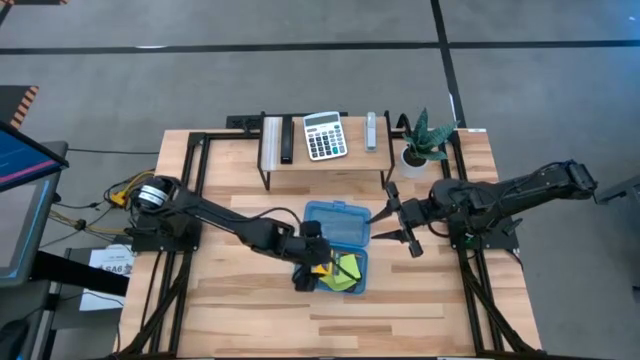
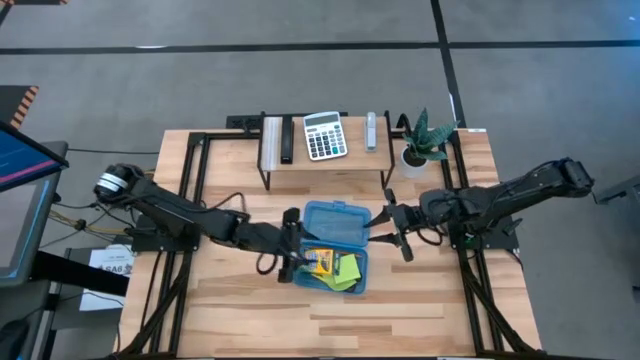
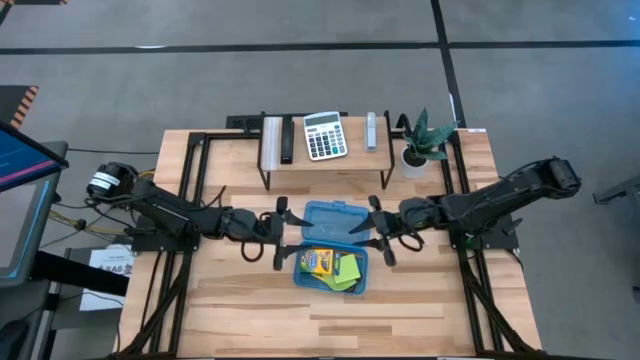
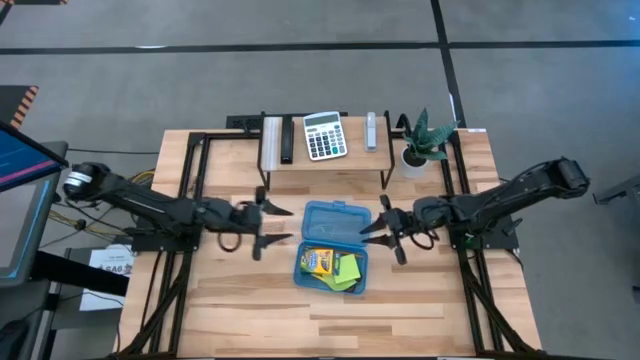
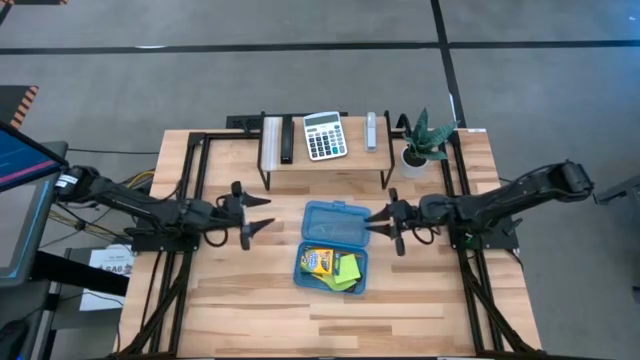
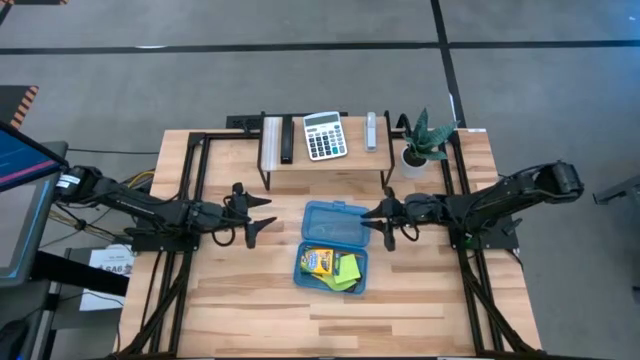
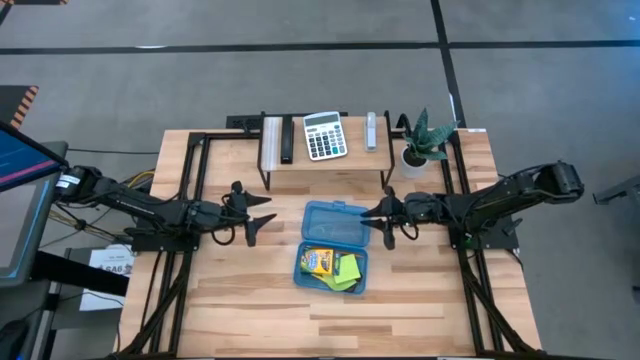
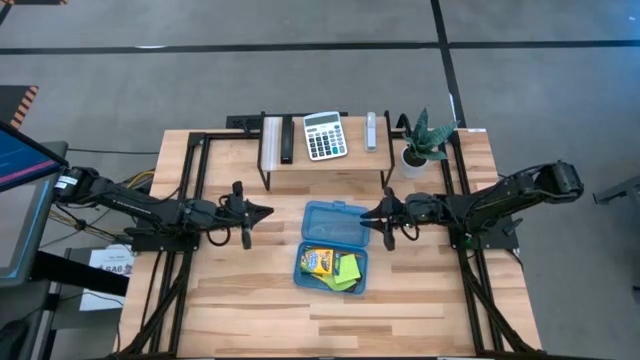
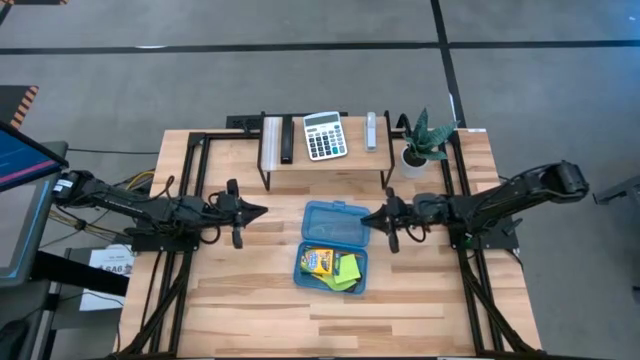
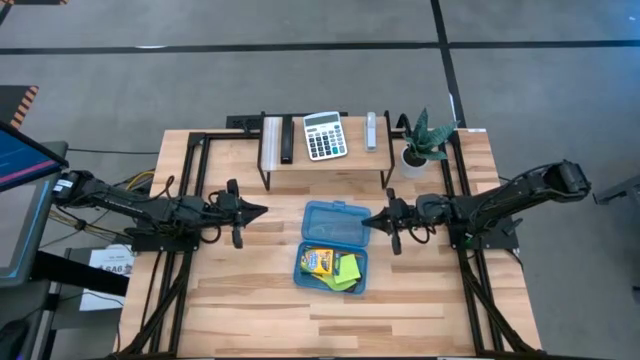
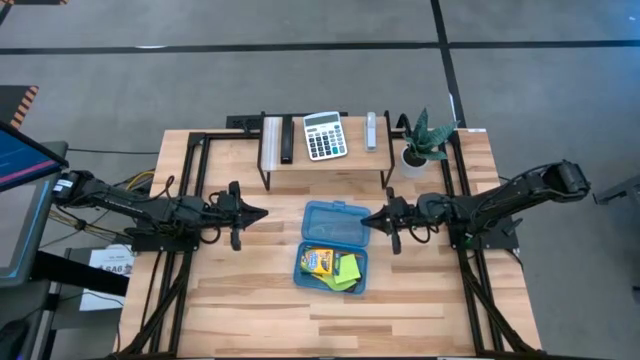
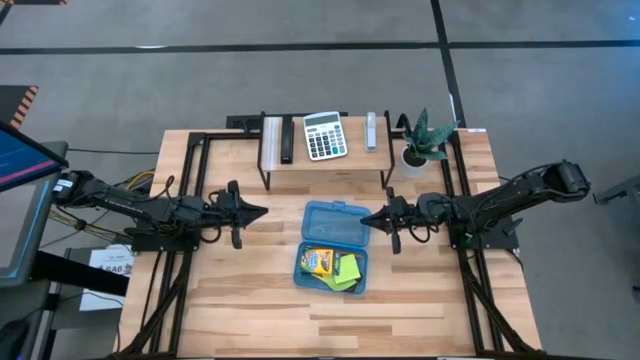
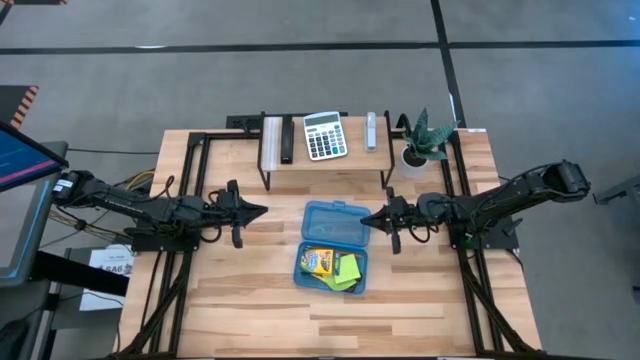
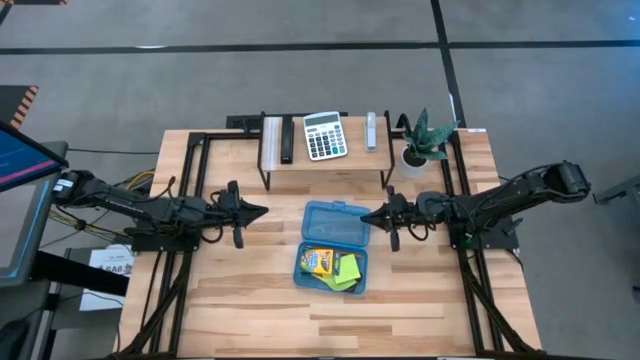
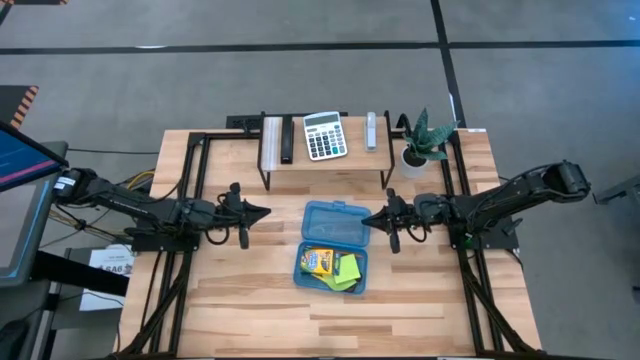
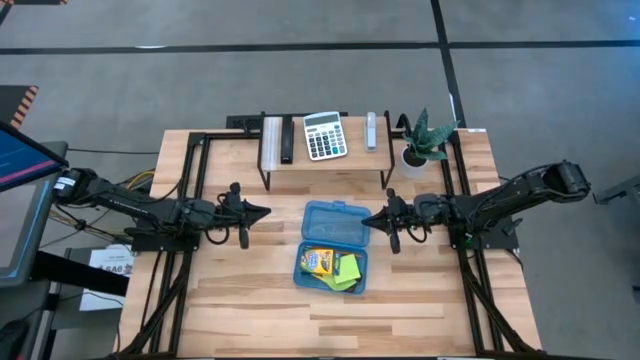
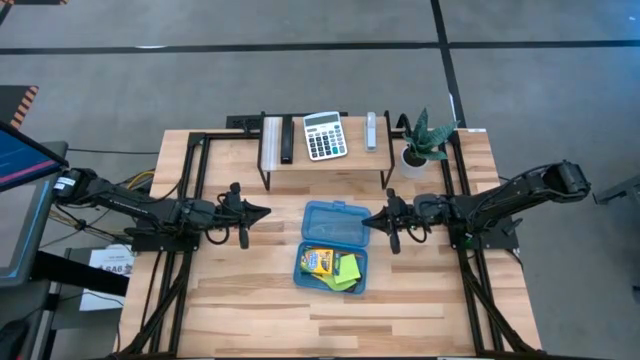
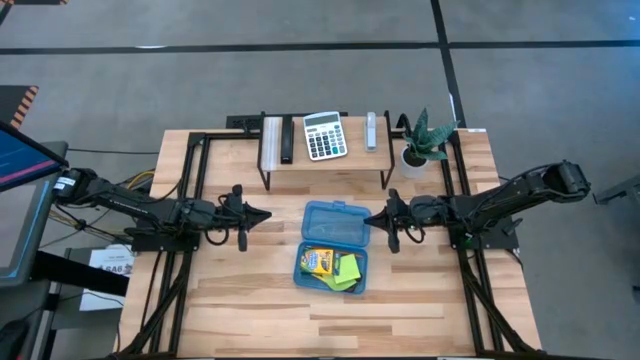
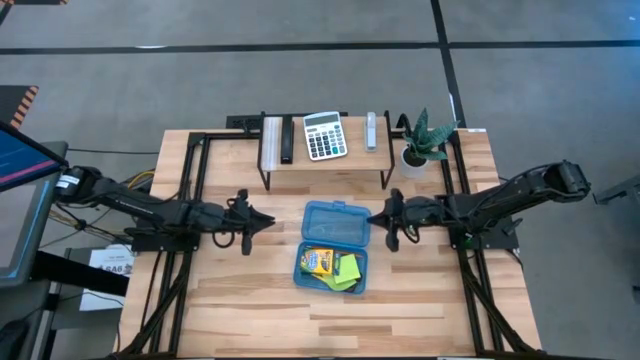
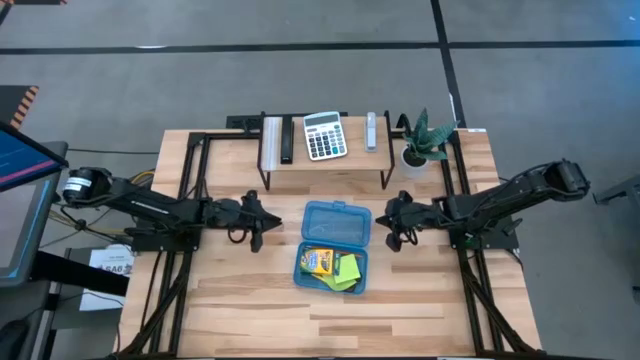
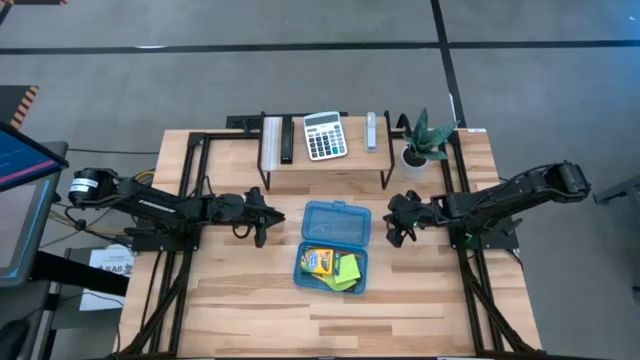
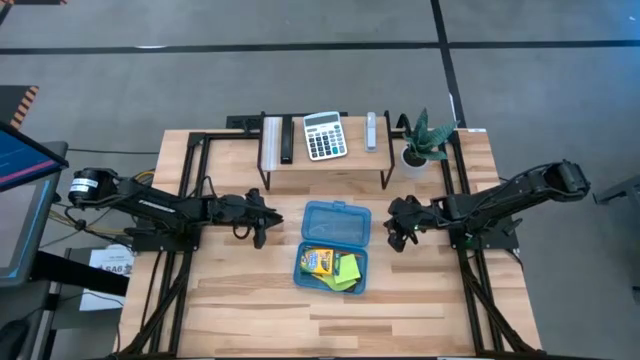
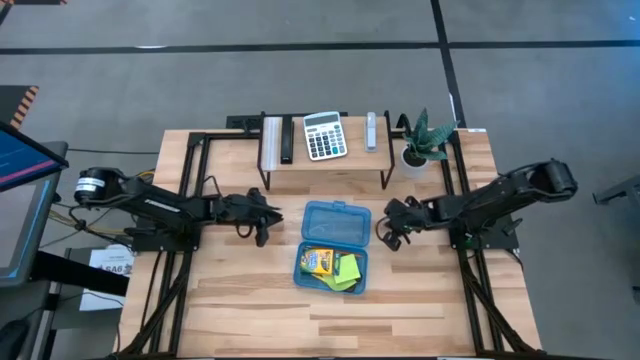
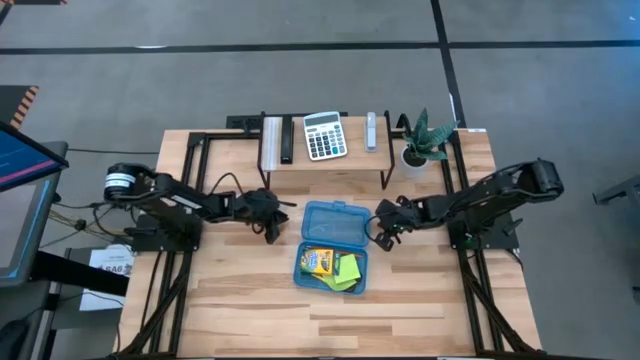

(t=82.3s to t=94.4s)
Task: Pack school essentials
Close the supply box

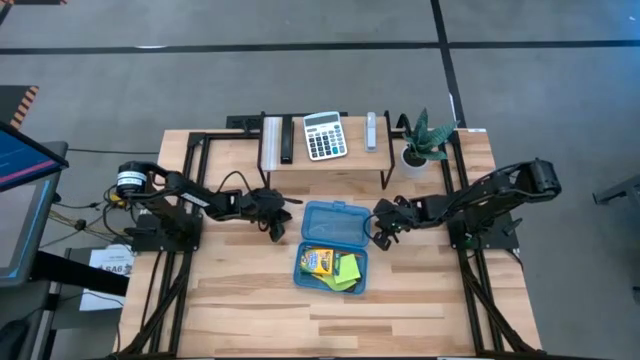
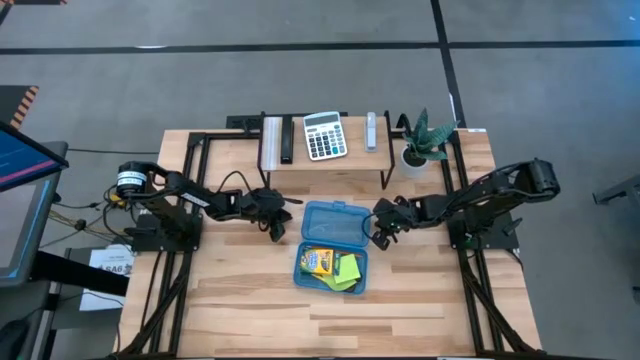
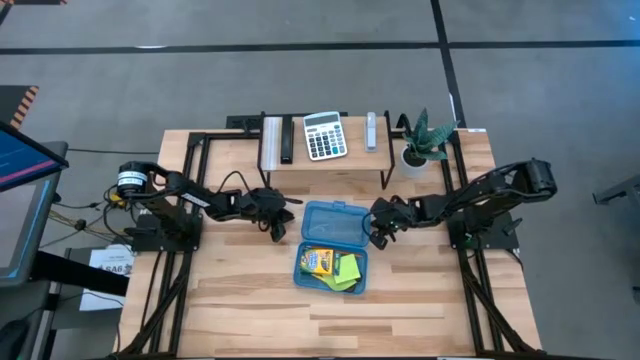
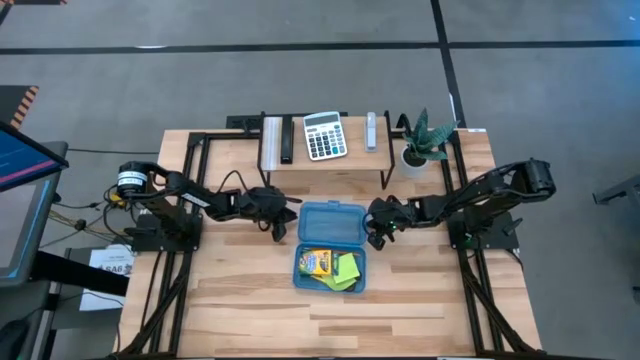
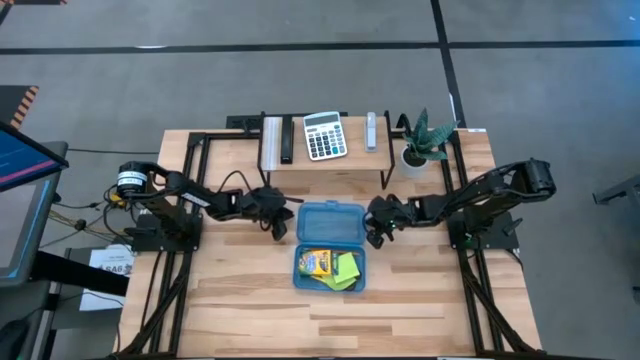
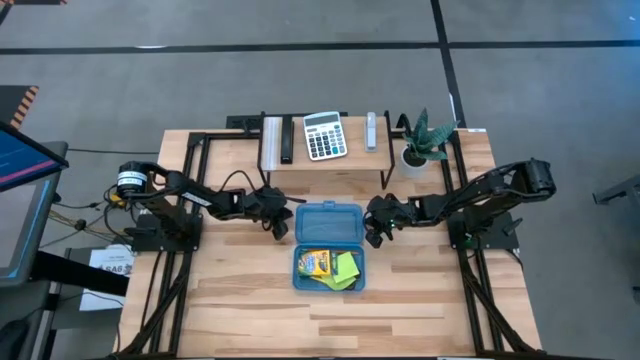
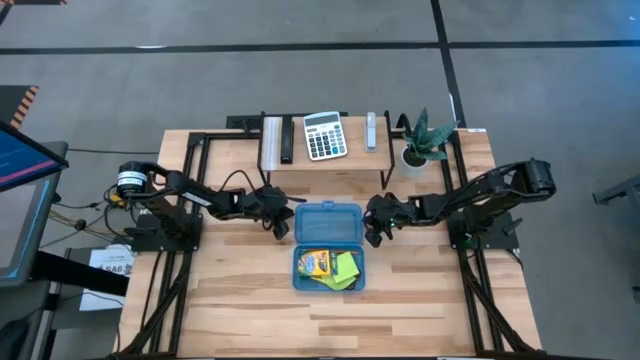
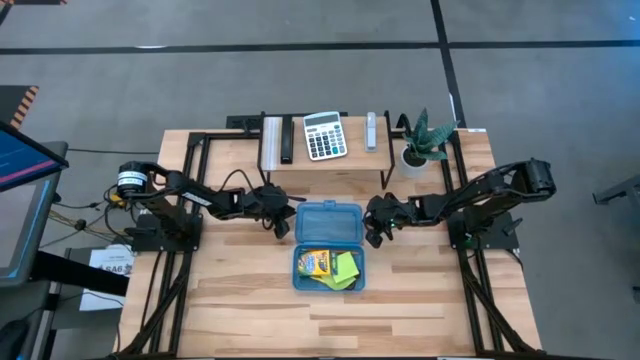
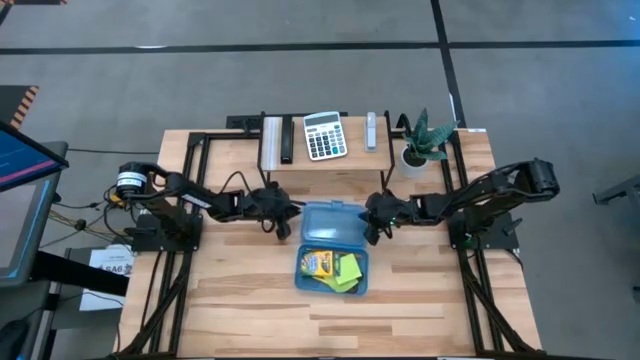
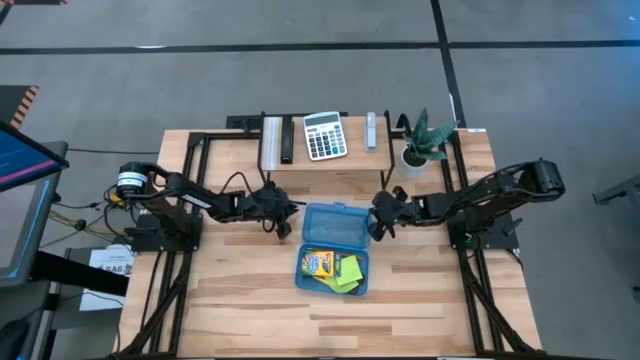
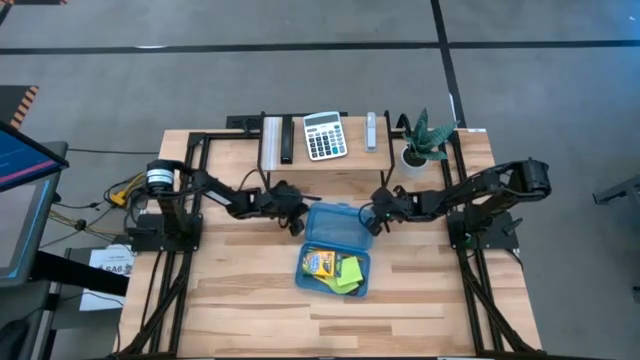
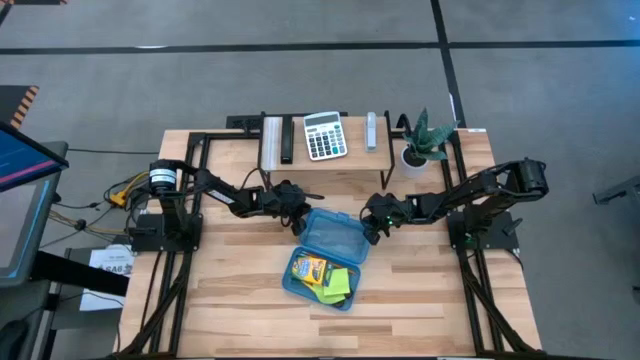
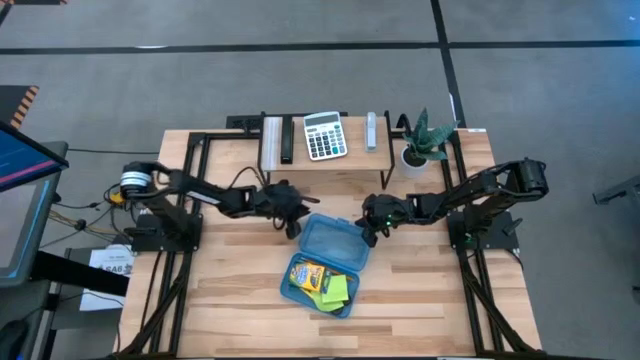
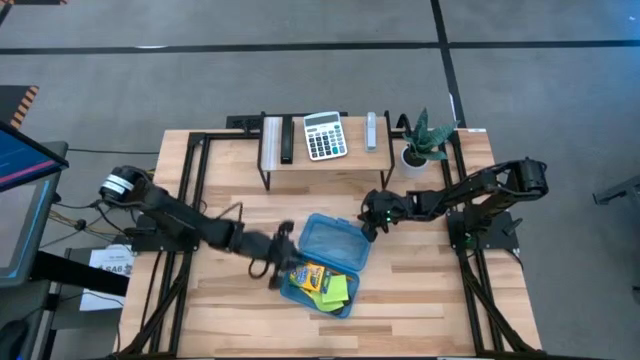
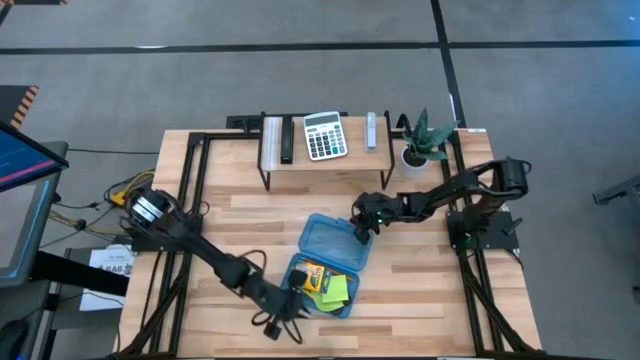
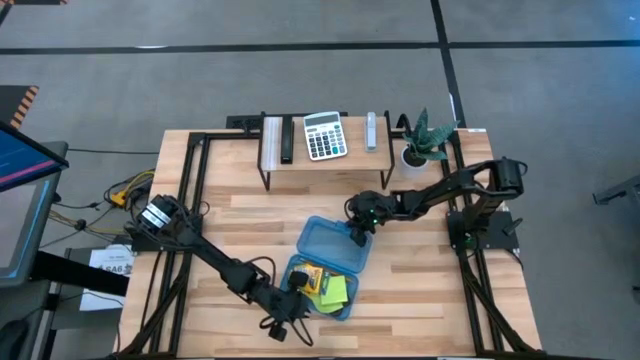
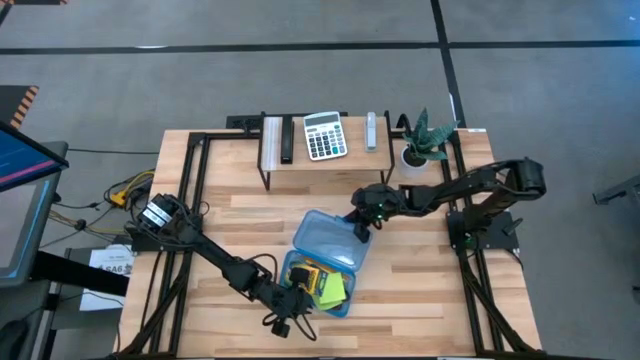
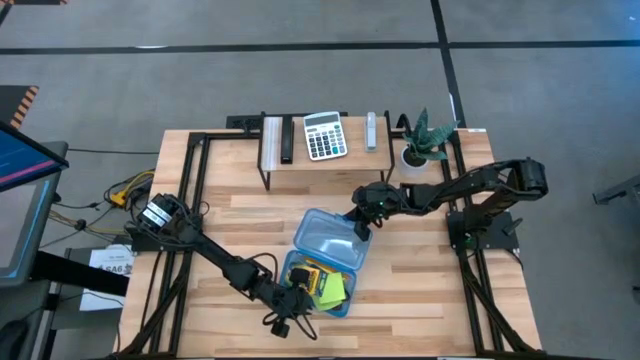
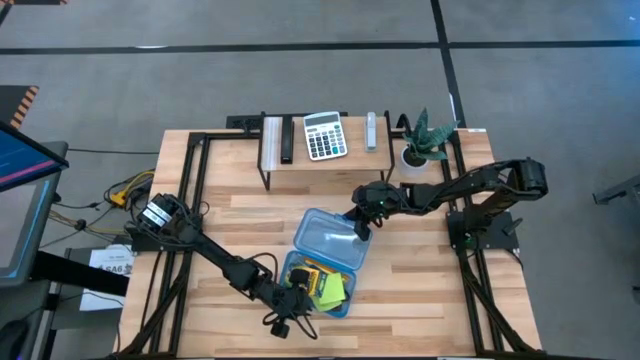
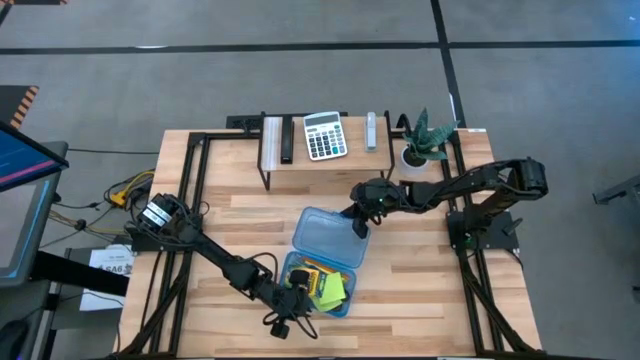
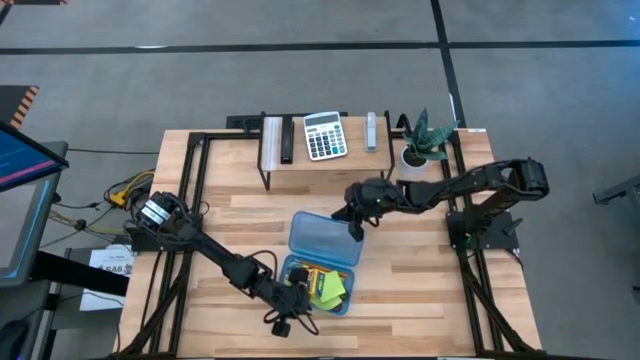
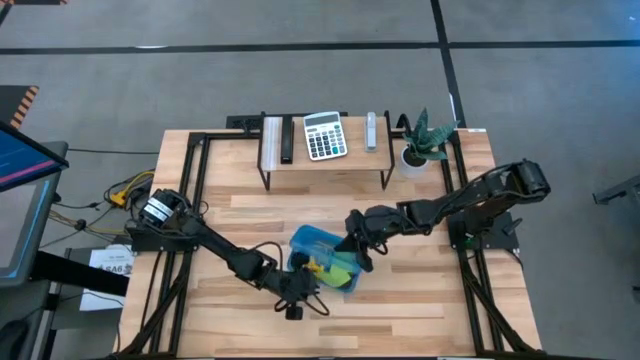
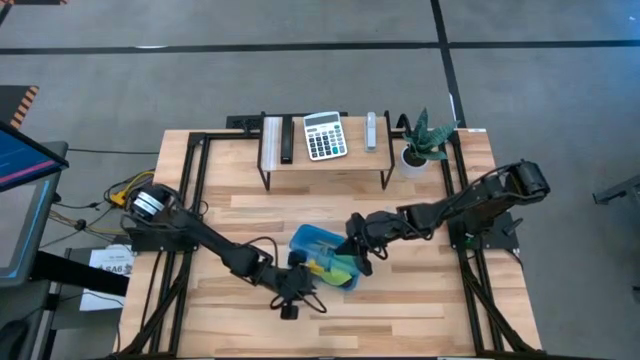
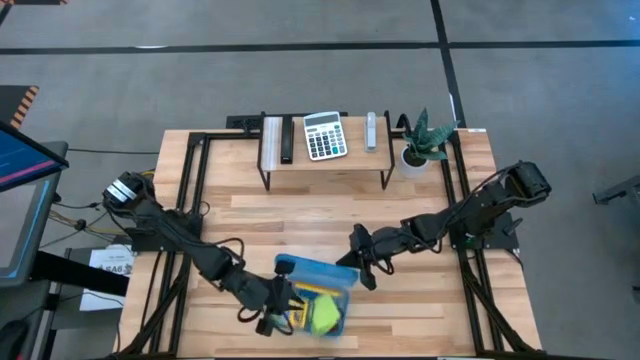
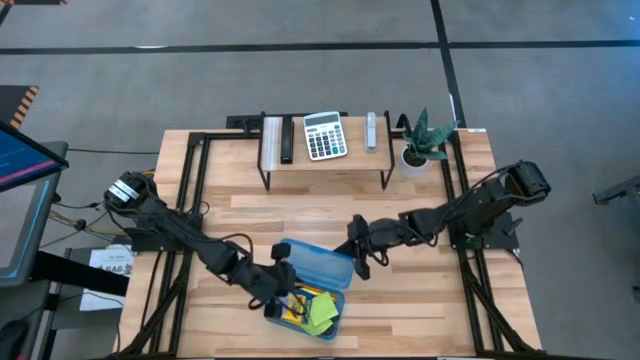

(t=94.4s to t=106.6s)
Close the supply box
